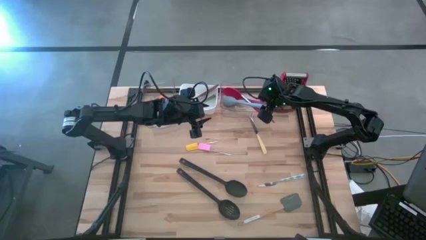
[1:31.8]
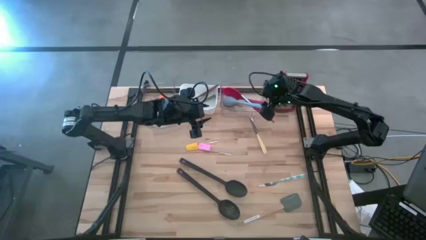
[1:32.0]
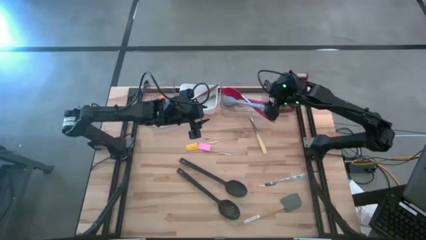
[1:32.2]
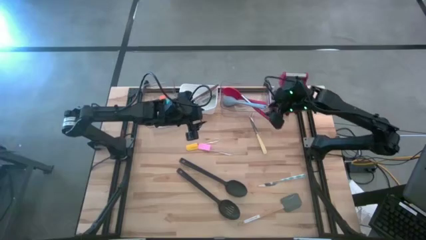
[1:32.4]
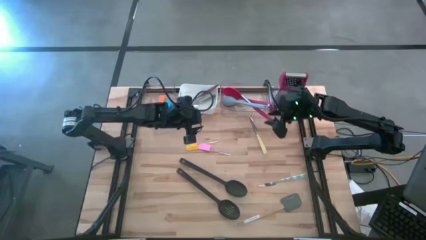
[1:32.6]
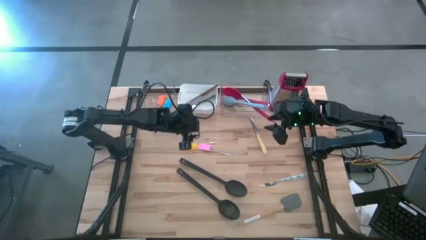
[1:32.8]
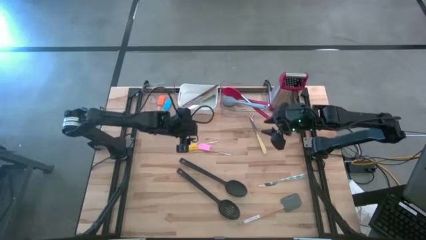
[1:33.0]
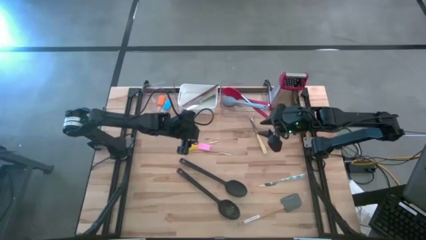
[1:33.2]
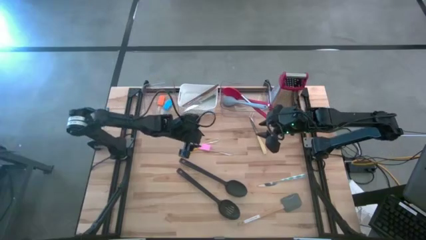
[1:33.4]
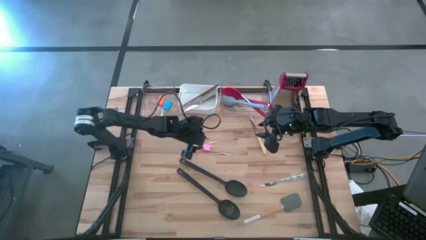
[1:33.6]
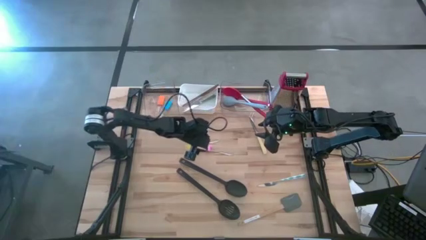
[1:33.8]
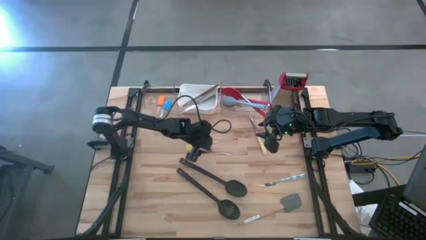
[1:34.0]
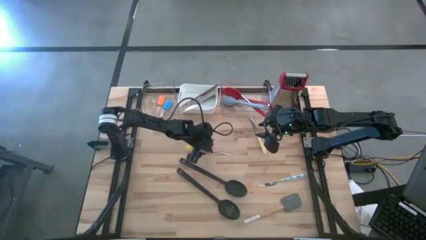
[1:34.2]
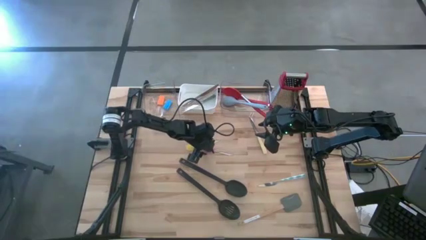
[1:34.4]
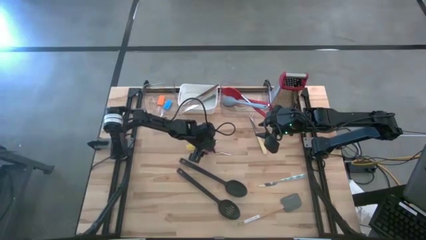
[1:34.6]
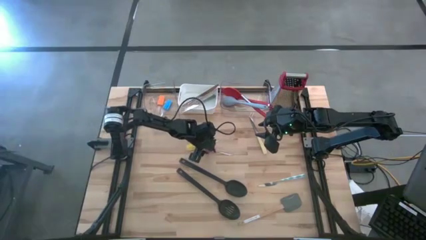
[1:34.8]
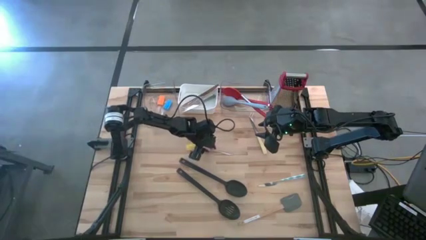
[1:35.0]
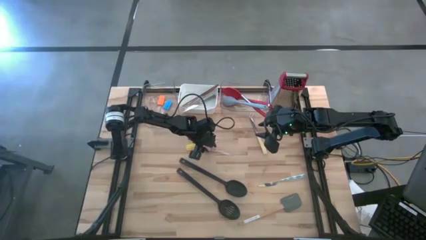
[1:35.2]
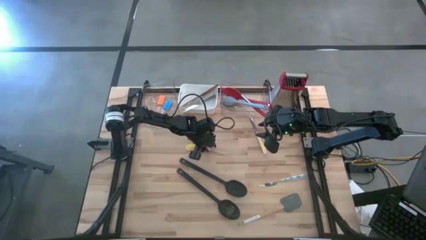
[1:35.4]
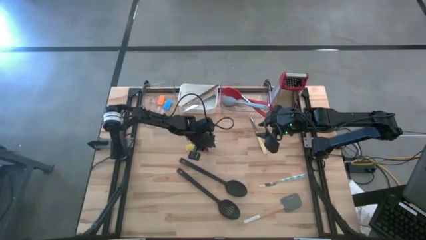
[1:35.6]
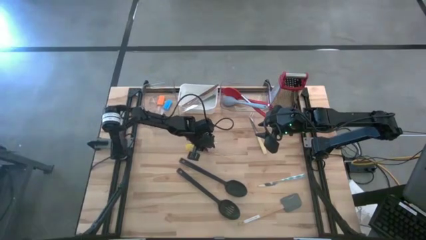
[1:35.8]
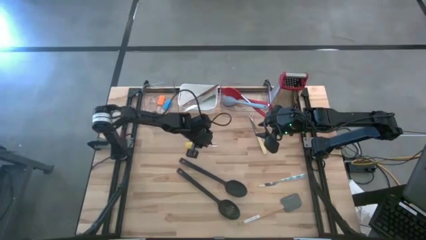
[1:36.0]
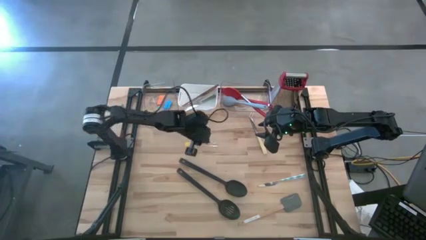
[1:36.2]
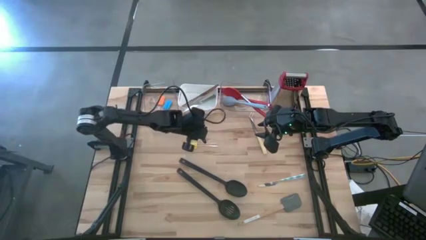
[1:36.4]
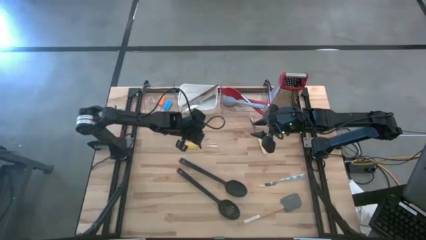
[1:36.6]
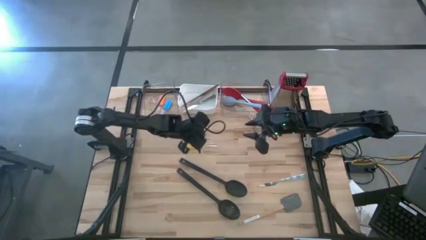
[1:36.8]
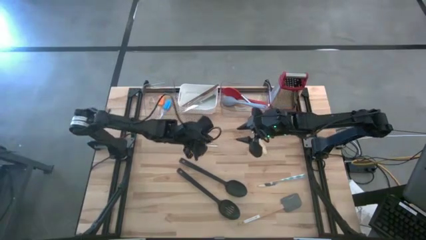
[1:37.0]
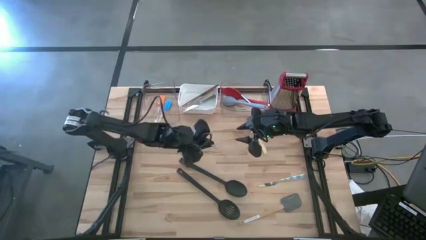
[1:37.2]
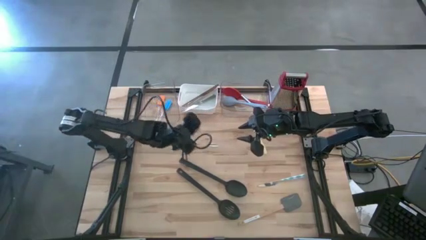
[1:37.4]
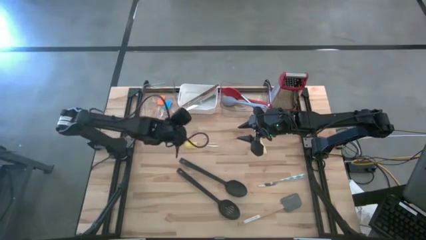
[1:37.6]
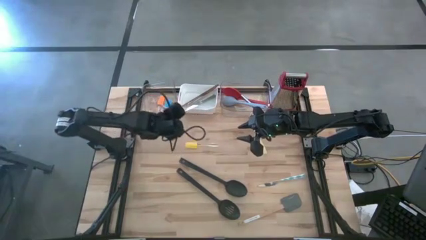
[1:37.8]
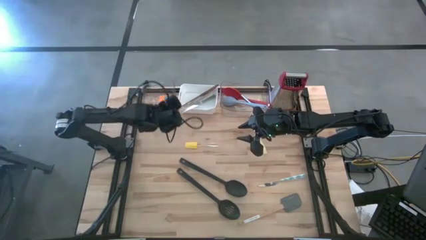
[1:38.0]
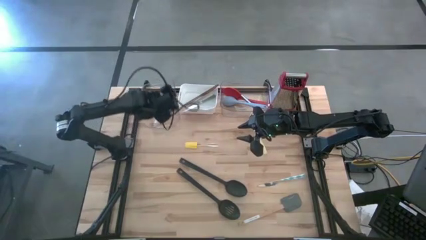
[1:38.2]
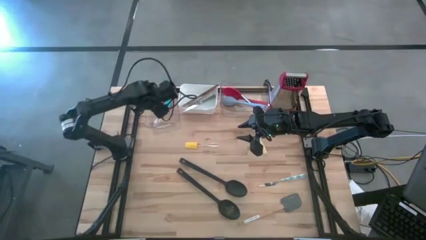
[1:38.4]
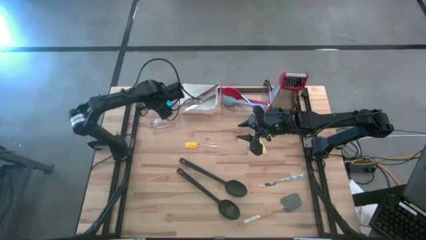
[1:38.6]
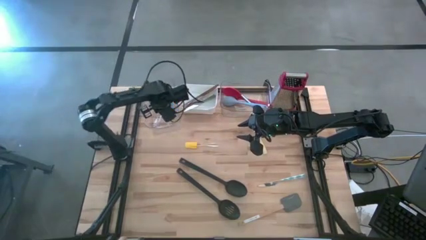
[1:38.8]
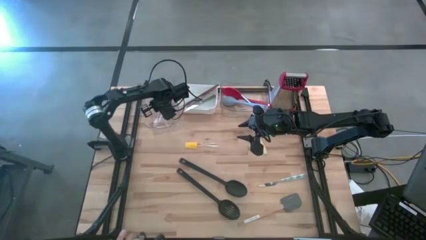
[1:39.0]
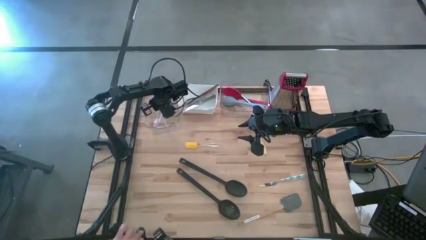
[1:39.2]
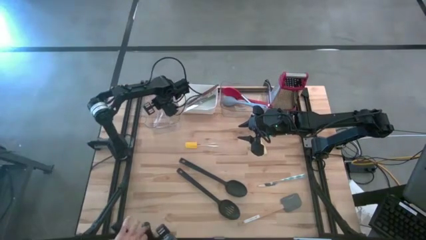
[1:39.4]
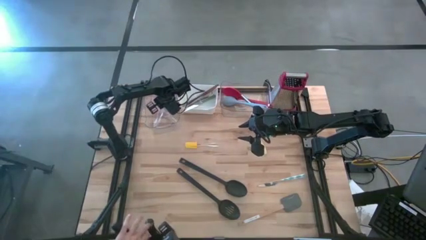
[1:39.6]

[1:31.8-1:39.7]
Task: Pick & Place Kitchen Items
Put the pink spatula into the left transparent bin

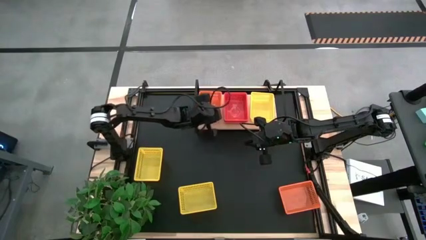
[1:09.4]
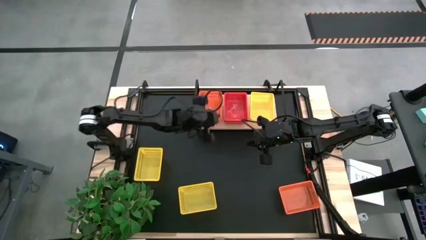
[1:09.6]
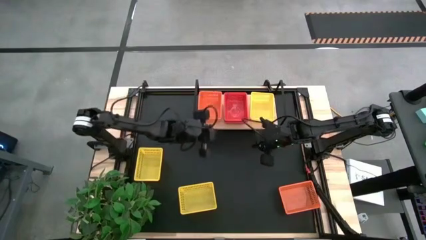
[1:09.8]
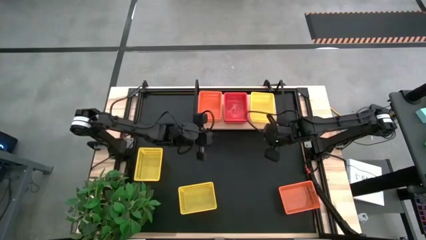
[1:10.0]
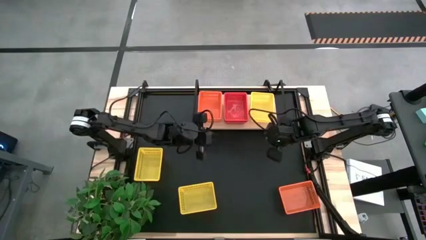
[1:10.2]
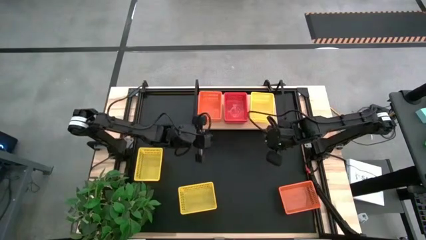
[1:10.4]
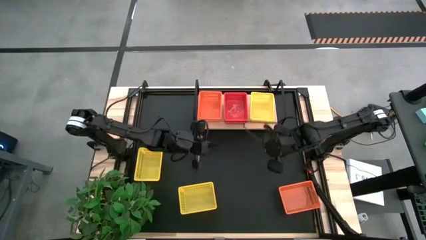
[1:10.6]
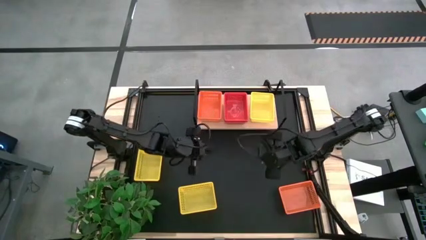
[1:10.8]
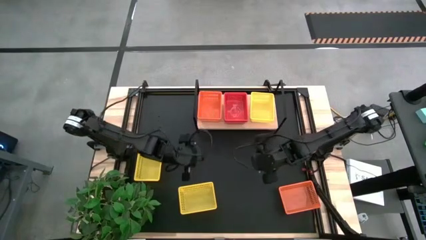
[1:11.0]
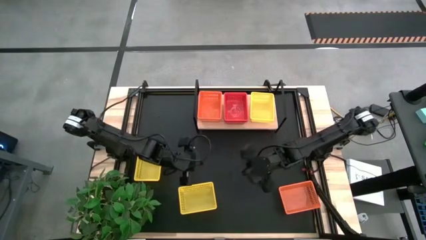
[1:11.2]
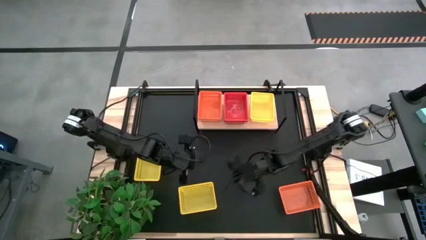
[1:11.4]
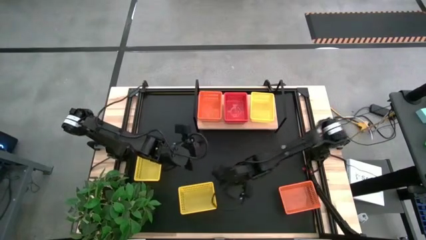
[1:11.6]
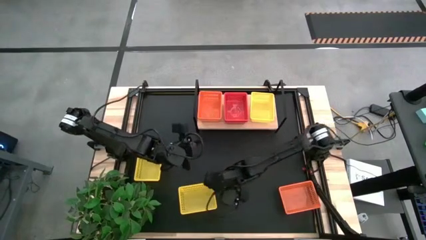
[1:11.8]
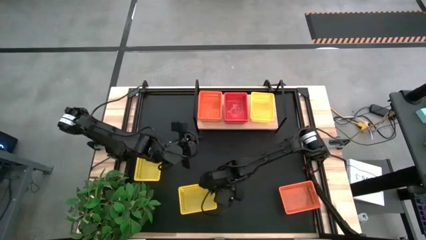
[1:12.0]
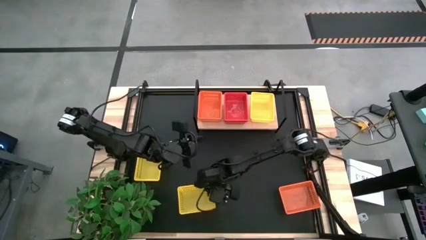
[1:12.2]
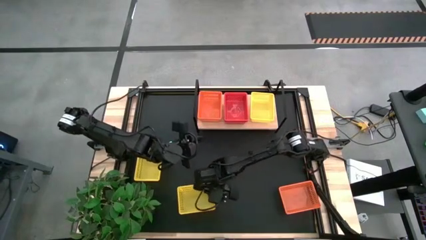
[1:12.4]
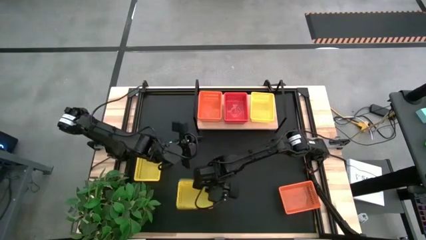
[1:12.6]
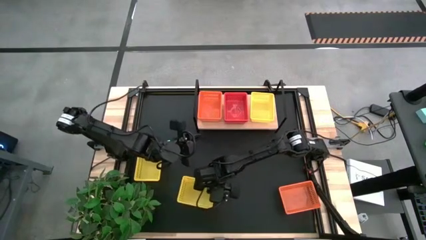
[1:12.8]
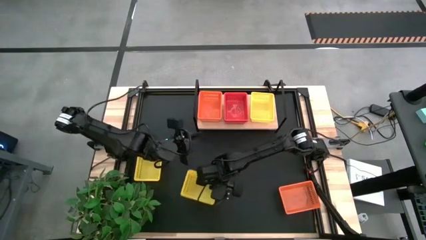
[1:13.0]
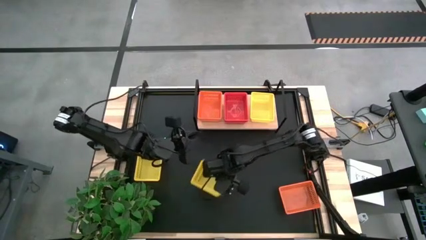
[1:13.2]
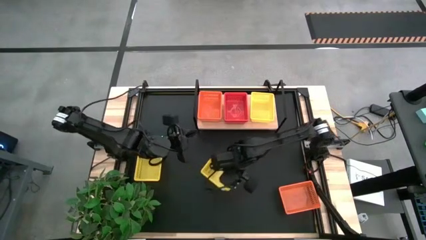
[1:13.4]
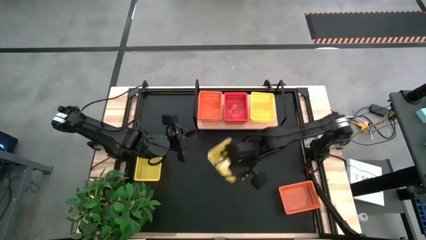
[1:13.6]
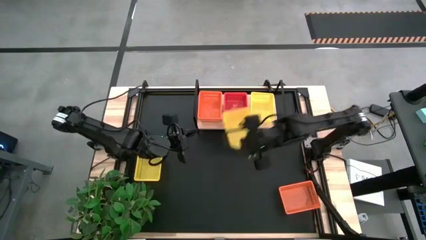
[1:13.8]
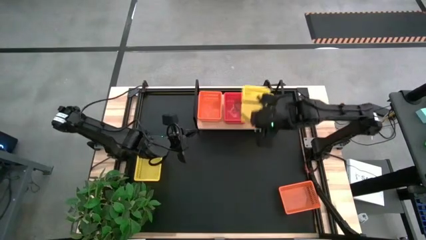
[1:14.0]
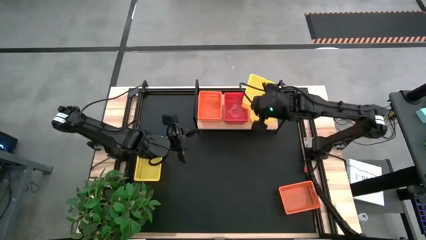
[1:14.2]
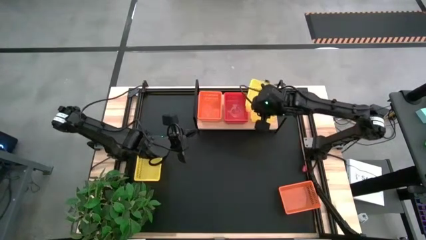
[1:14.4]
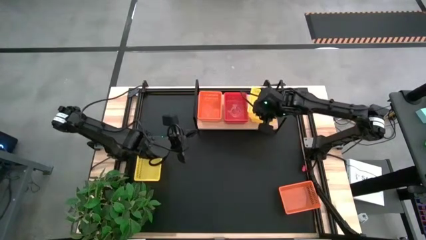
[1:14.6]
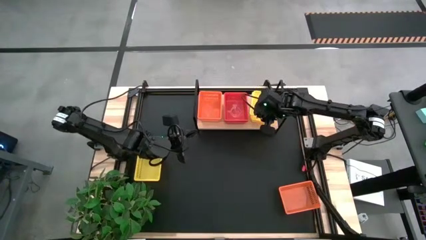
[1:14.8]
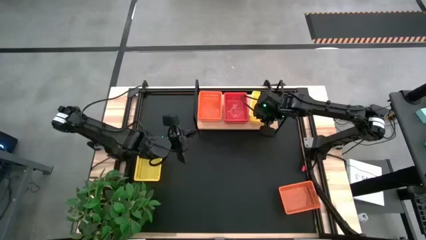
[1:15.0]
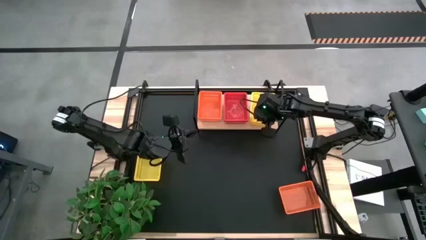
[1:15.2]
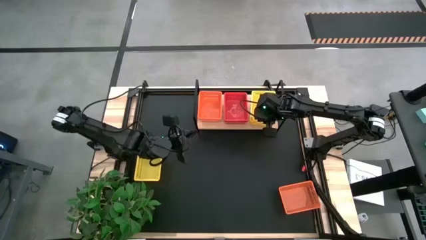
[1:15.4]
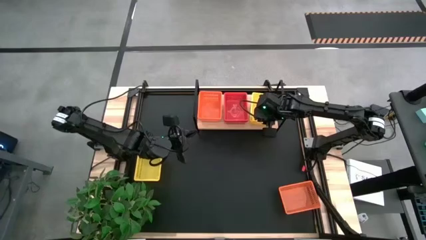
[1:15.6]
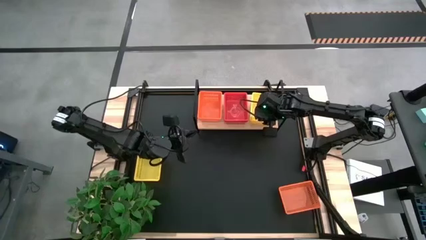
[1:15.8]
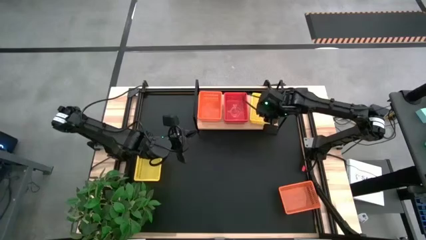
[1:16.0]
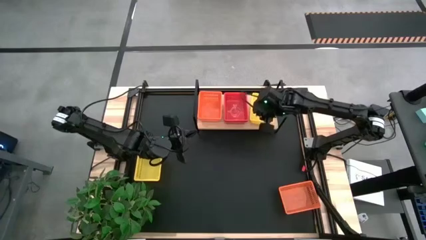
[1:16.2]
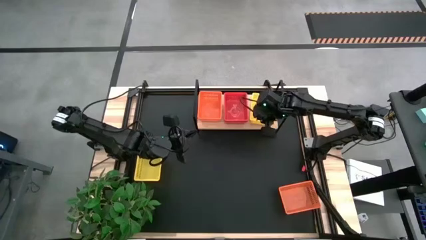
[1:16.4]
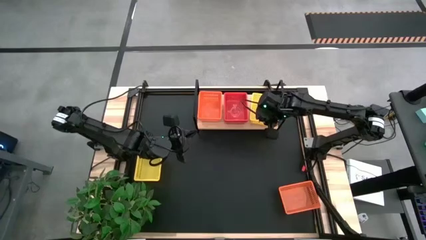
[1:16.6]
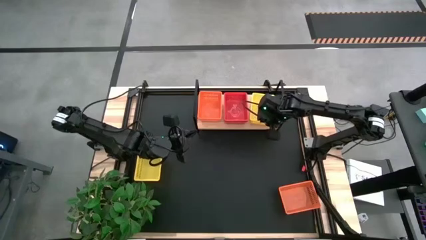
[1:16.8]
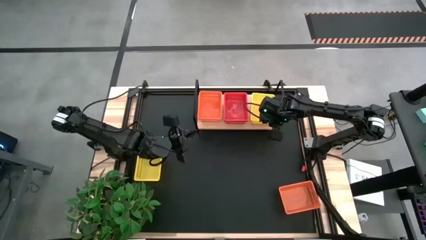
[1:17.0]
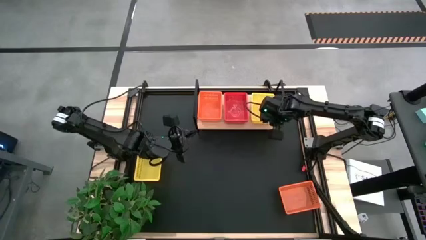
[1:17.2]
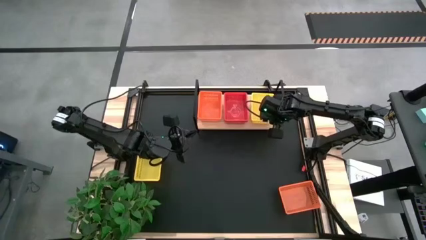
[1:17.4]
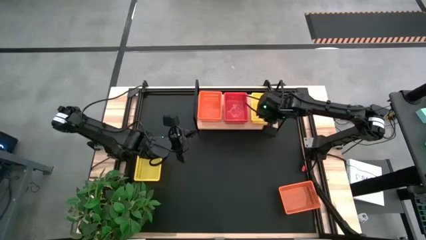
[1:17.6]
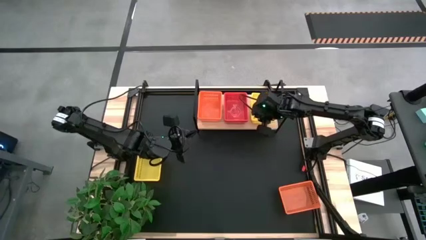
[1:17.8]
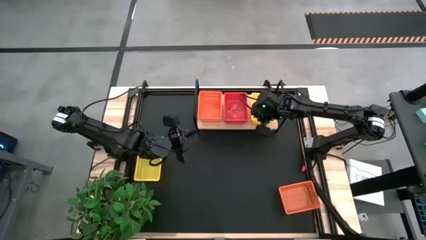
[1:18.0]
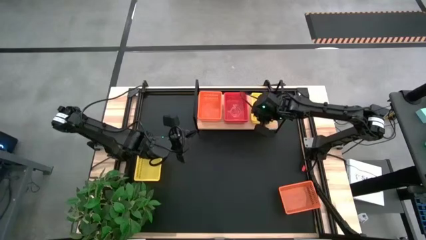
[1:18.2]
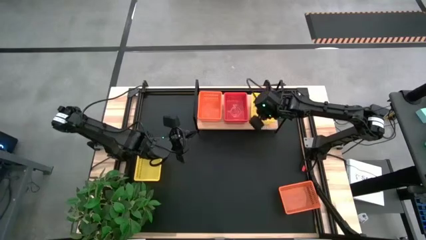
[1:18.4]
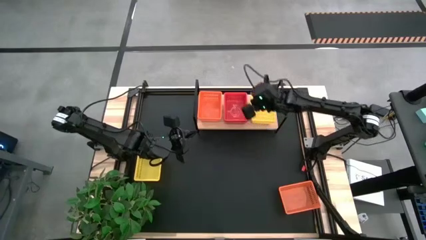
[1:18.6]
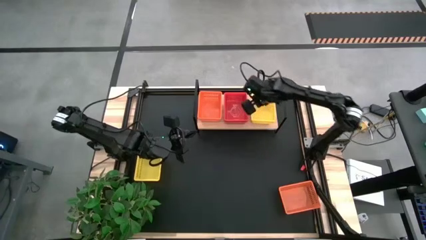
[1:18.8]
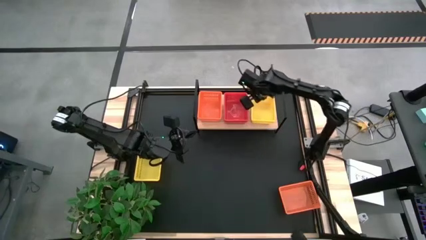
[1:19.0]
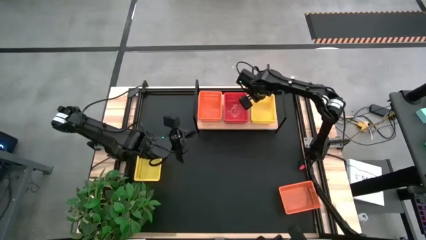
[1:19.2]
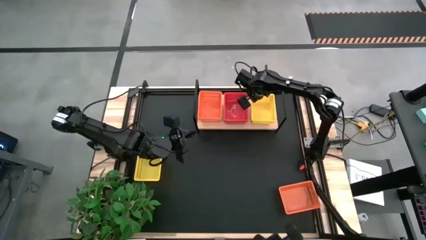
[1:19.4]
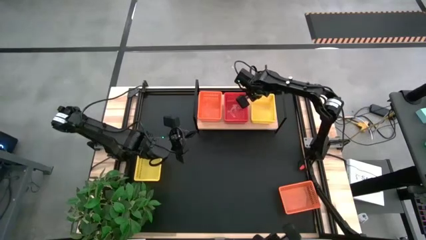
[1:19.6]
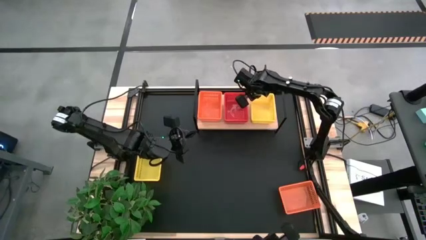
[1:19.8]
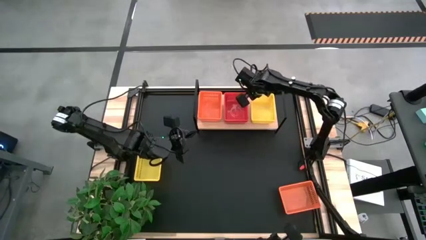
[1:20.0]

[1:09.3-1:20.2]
Task: Stack baskets on shelf by color
Stack the bottom yellow basket on top of the yellow basket on the shelf
